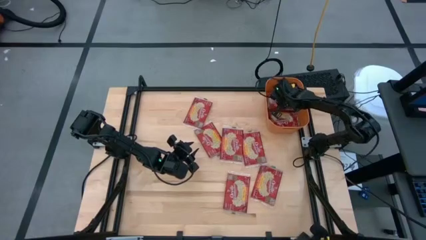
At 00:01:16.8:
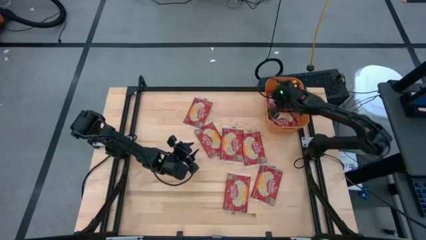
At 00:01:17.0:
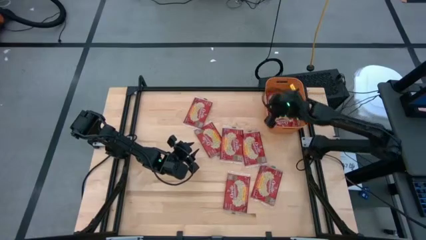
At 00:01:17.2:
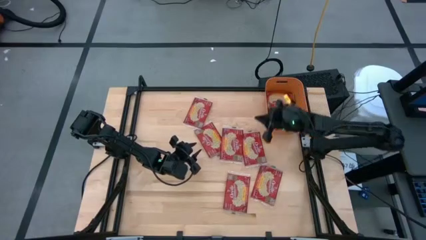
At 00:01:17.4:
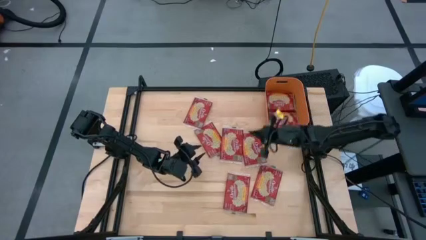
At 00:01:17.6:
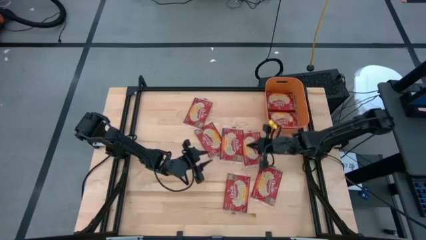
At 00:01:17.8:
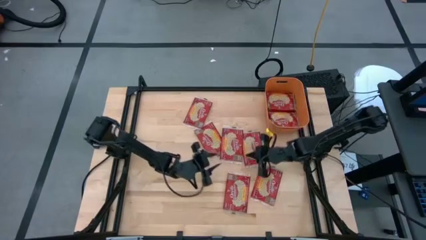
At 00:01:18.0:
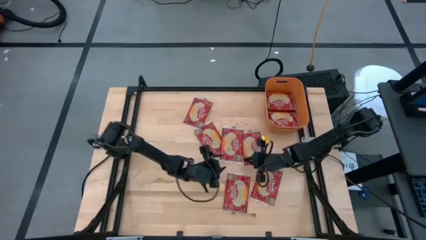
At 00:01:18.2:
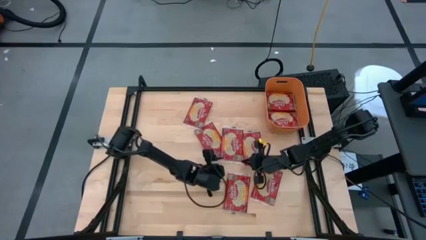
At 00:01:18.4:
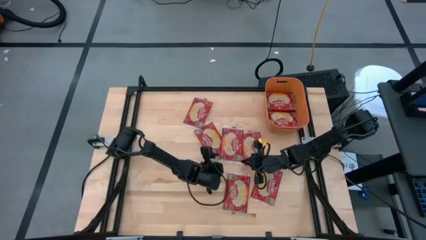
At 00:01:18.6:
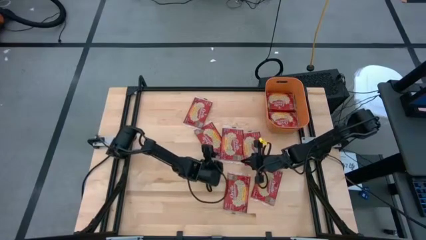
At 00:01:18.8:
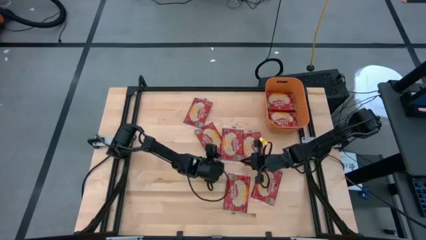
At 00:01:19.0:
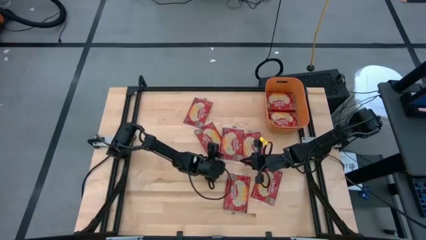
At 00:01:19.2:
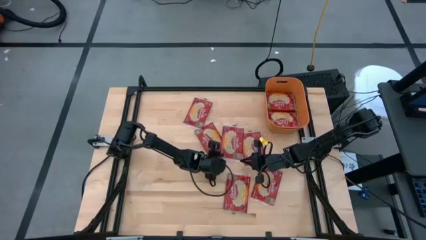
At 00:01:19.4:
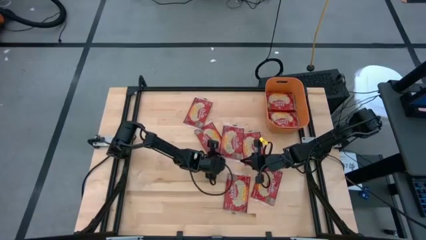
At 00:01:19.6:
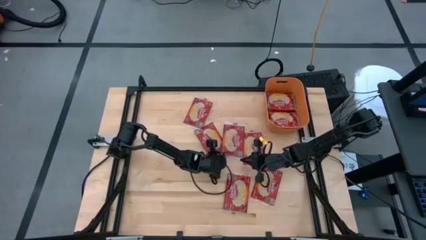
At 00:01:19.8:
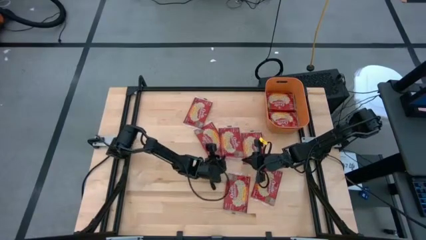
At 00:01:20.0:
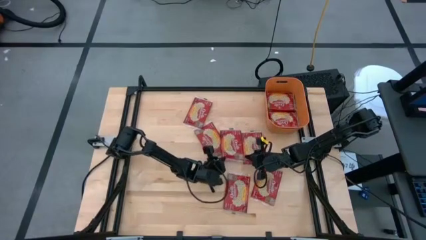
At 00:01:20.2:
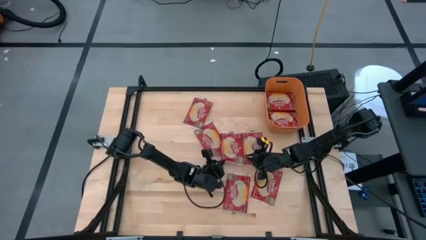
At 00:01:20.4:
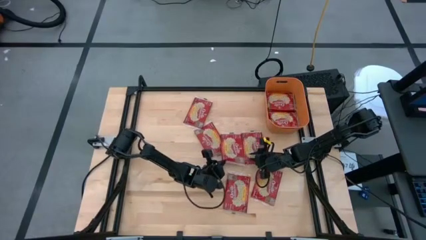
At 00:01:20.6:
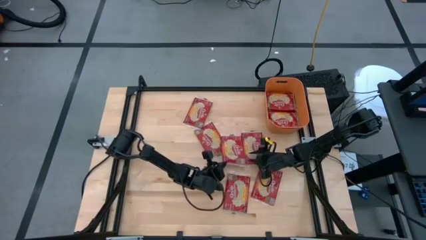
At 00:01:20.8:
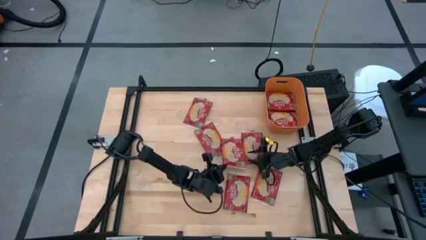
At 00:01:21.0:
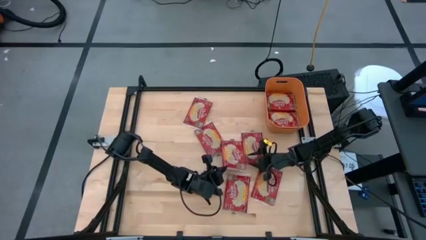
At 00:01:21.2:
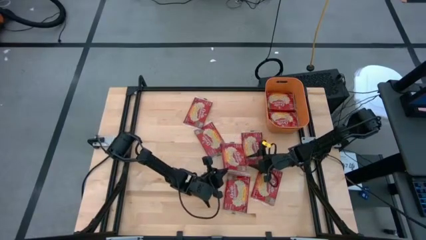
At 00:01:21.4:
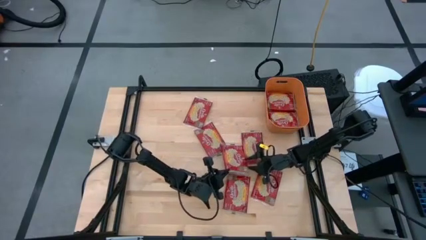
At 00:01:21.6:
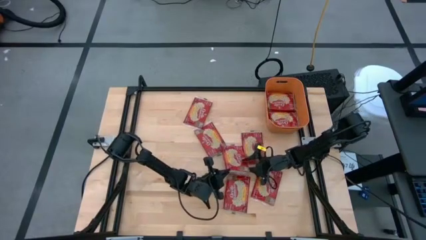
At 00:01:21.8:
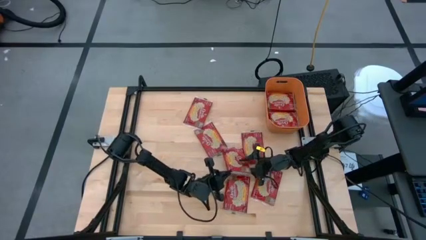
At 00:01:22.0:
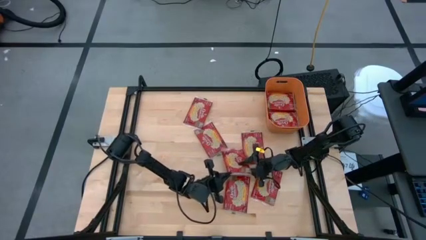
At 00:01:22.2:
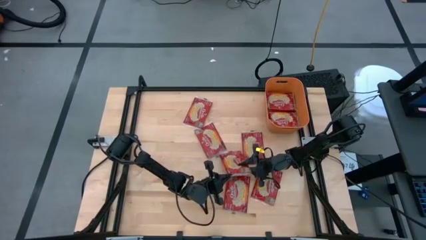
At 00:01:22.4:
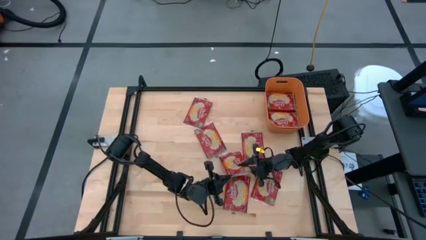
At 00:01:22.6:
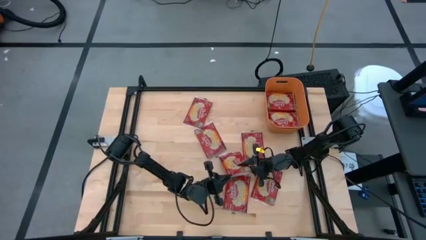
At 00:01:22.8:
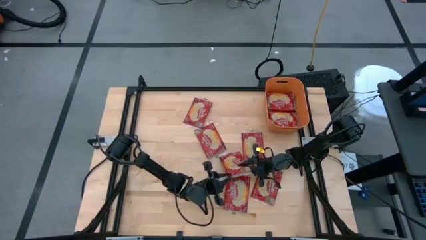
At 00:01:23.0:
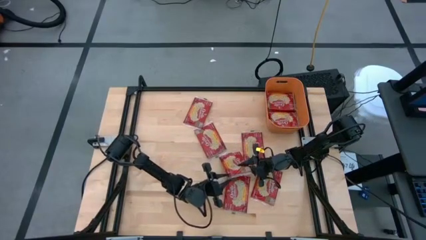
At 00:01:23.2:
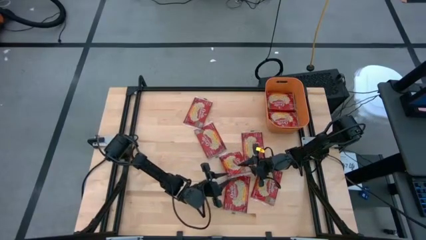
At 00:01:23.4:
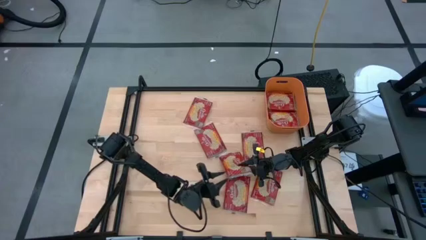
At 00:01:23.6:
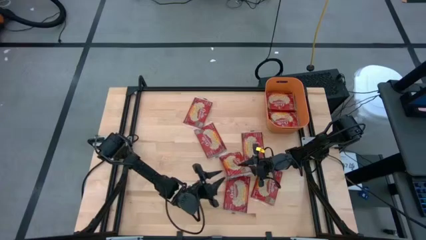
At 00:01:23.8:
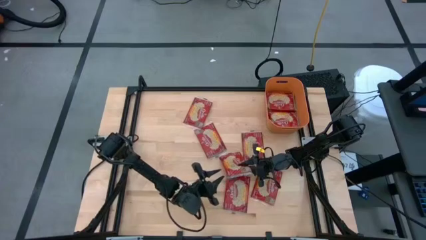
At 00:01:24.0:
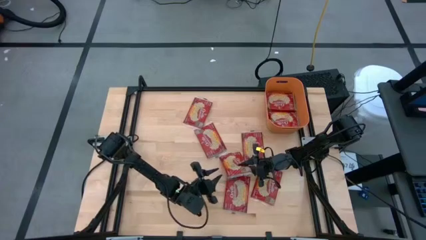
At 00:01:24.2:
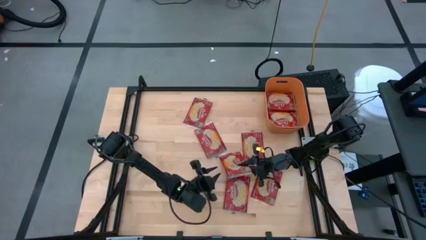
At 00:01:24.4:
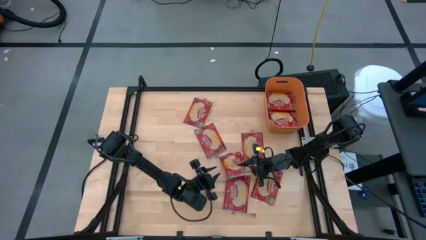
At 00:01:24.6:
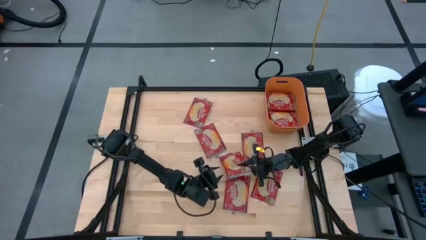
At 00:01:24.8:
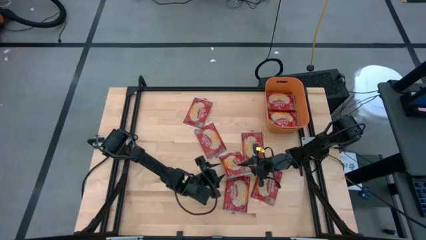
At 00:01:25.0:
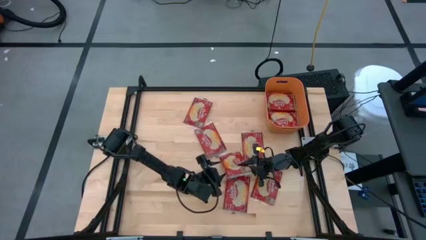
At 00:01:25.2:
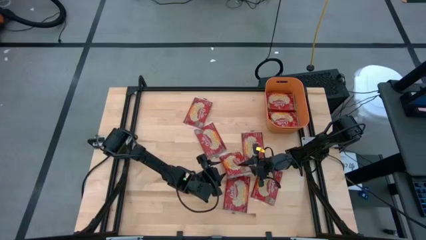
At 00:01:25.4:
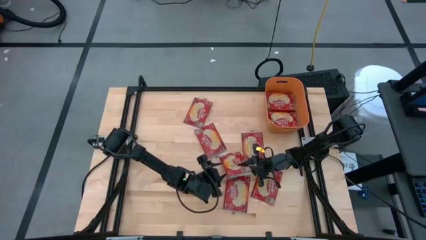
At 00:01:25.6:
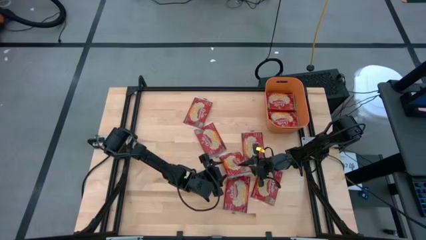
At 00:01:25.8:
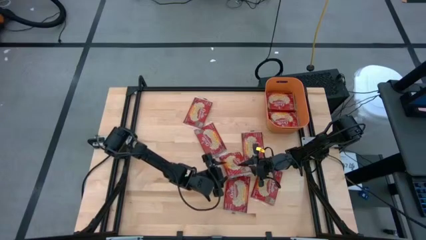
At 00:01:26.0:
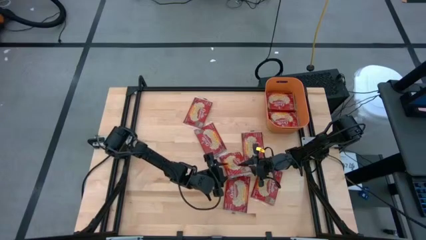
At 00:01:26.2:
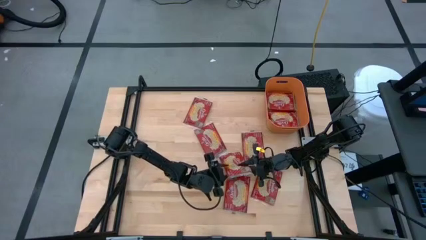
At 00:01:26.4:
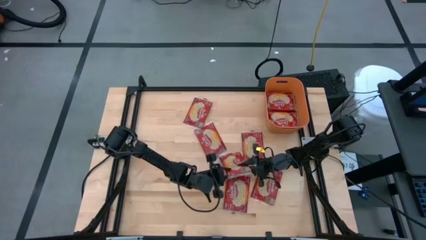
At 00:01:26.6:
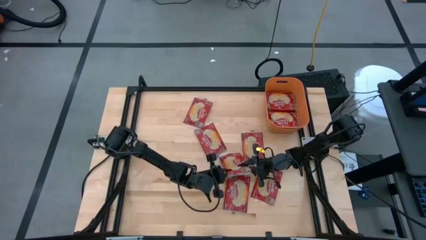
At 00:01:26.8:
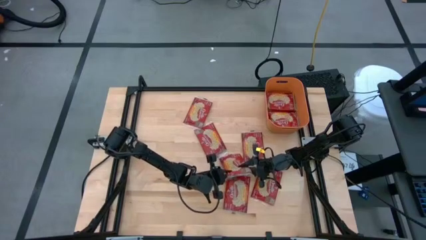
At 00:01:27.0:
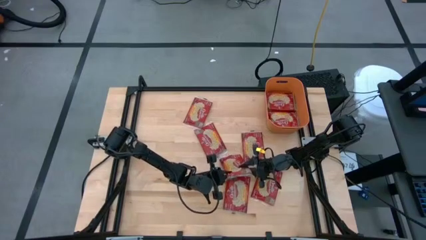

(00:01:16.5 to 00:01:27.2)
Task: Sort popcorn bags into baskets
Put the red popcorn bag into the orange container

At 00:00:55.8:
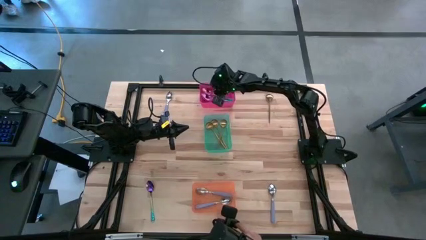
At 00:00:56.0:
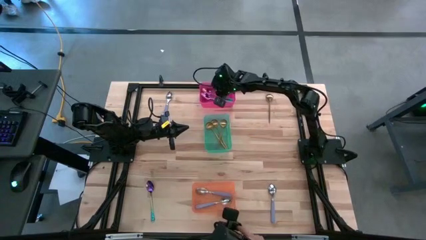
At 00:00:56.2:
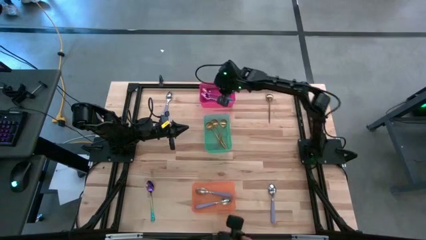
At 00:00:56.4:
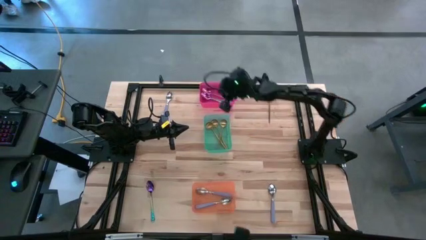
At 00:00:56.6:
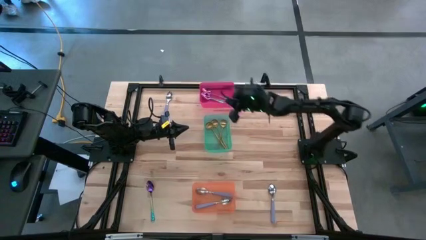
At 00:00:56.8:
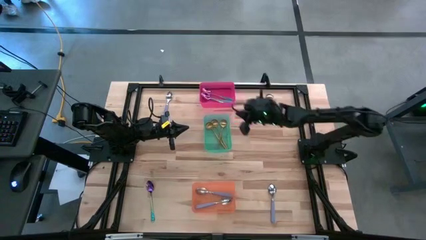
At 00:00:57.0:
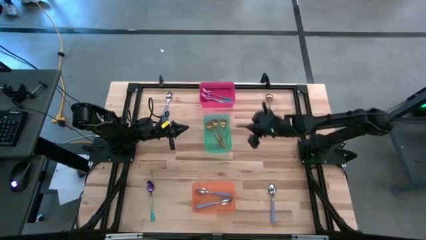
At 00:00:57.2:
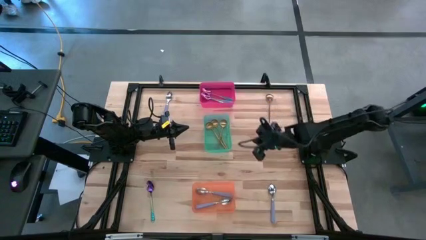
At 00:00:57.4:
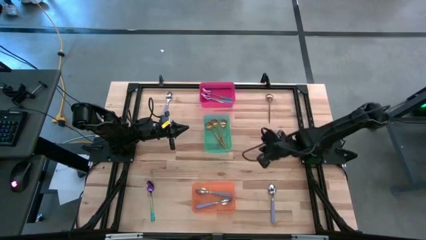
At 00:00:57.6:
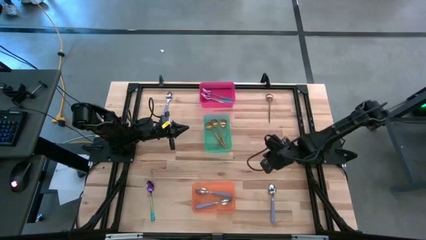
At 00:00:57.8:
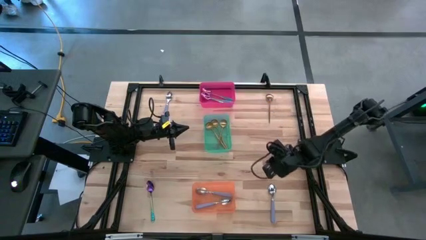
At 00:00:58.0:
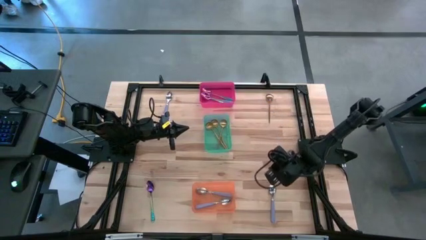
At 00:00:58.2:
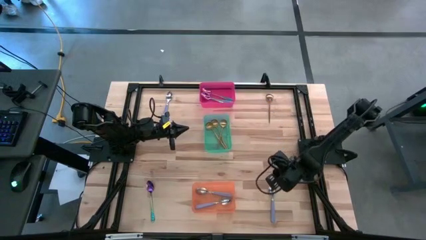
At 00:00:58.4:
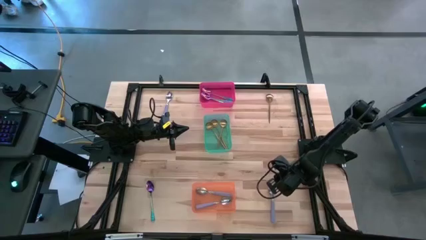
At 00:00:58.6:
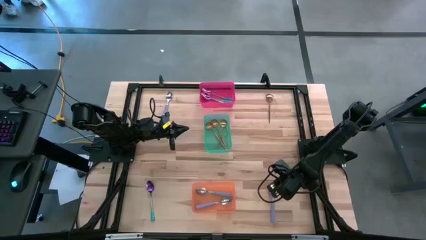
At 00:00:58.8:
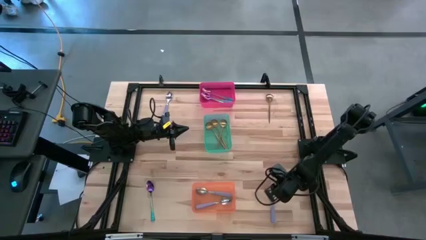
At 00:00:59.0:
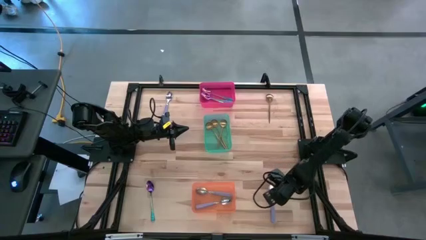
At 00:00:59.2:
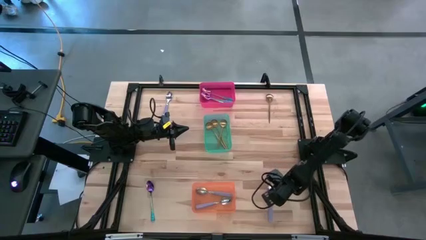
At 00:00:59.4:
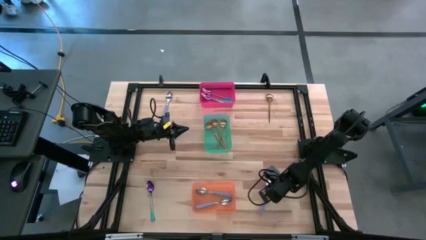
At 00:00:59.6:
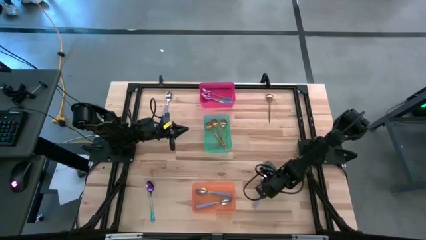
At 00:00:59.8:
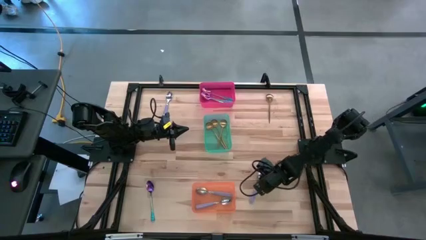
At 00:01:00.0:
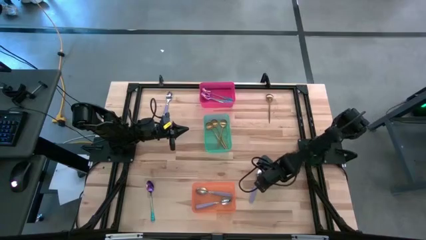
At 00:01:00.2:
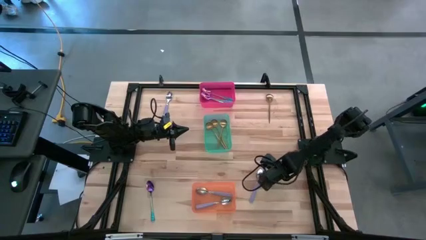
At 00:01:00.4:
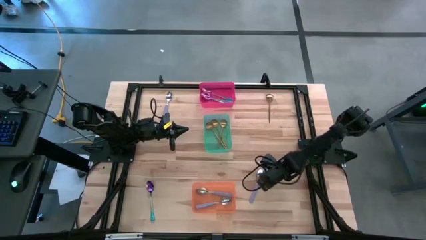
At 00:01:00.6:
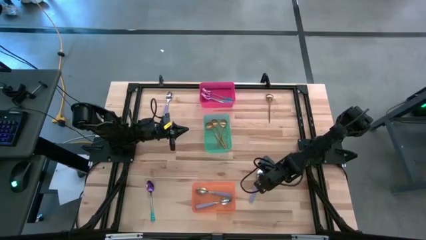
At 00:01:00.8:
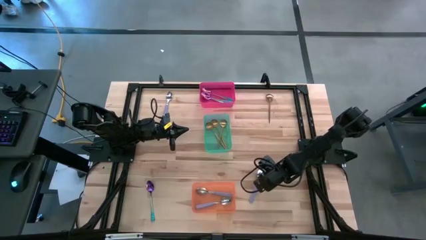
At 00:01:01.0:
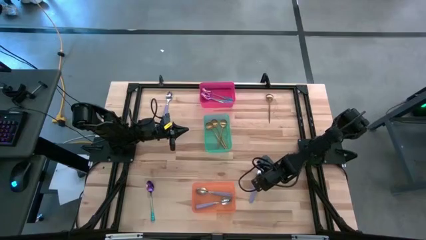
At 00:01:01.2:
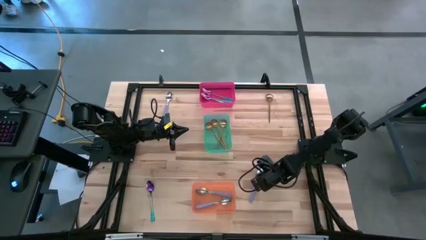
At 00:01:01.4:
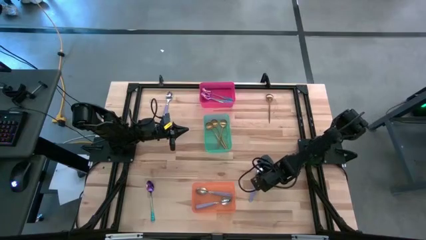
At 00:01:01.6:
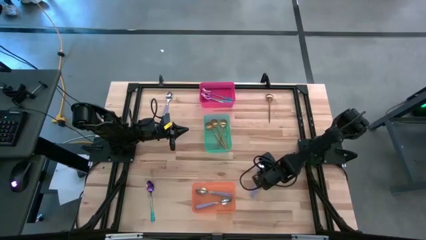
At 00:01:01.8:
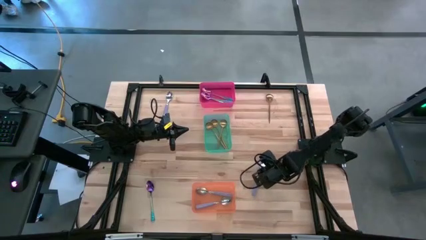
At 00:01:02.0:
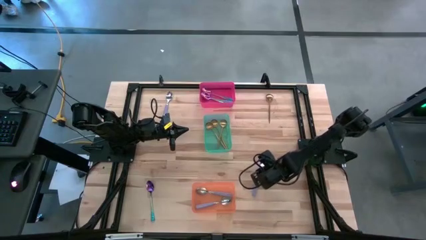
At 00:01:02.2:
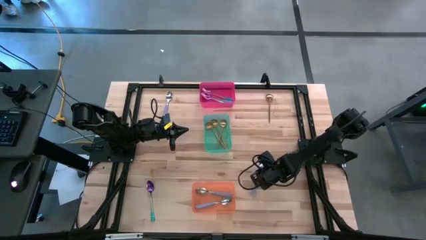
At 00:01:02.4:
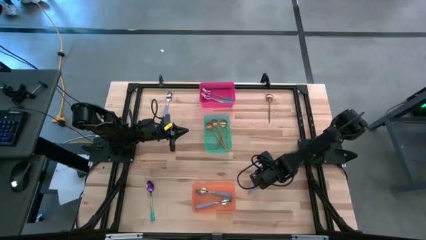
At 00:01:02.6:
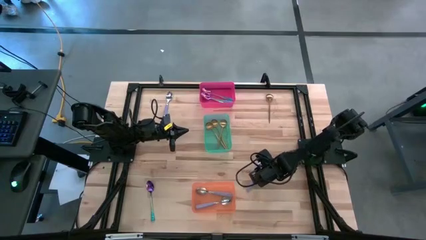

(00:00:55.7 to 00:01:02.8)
Task: Sort silverware by color (type)
Put the purple spoon into the orange bin
